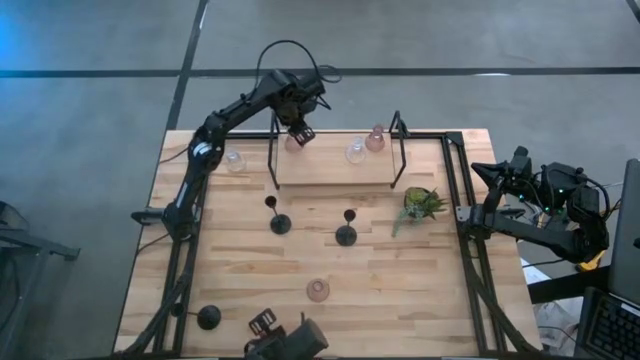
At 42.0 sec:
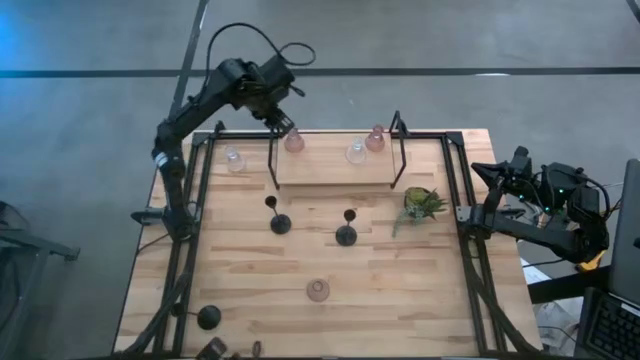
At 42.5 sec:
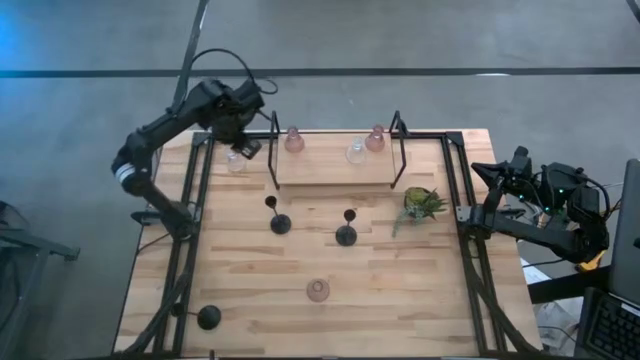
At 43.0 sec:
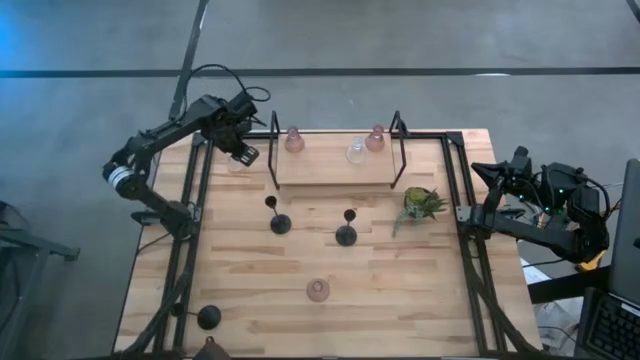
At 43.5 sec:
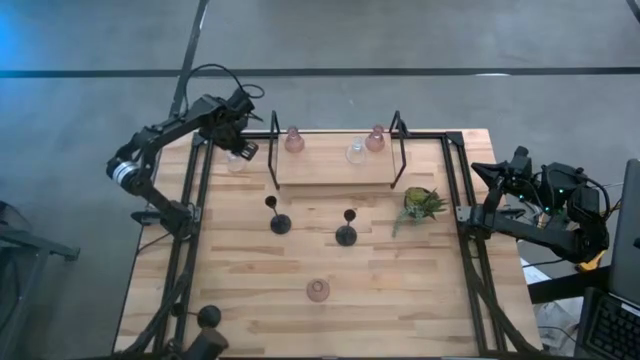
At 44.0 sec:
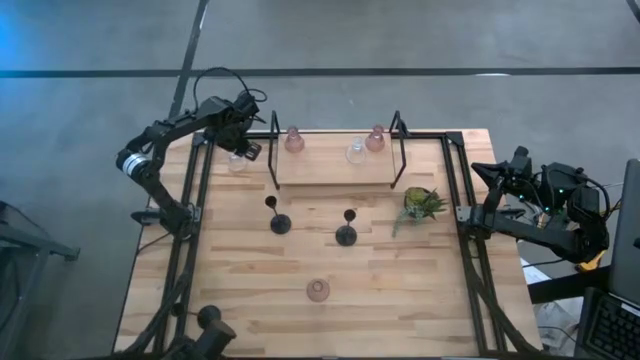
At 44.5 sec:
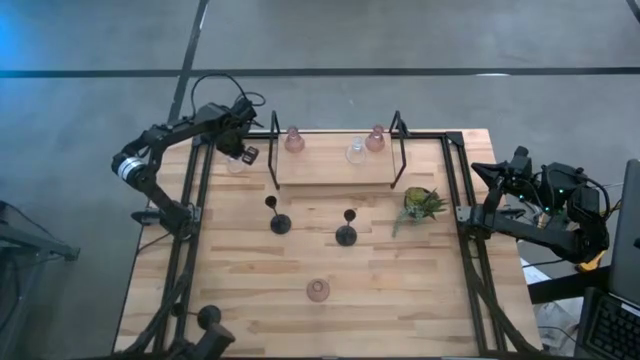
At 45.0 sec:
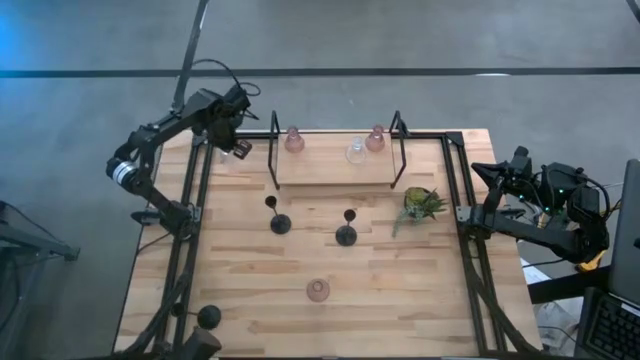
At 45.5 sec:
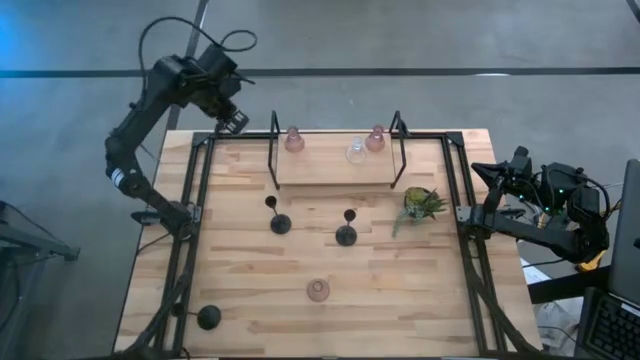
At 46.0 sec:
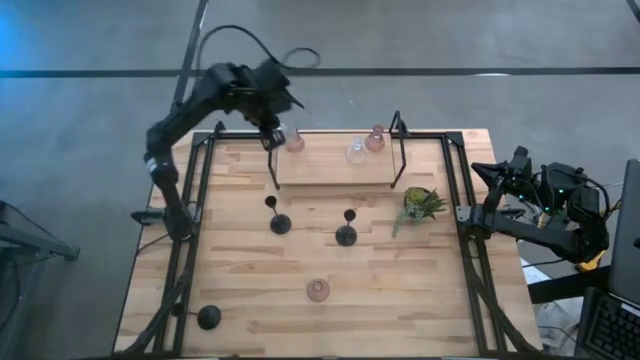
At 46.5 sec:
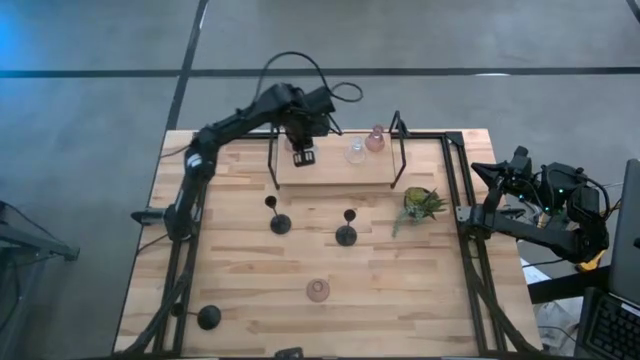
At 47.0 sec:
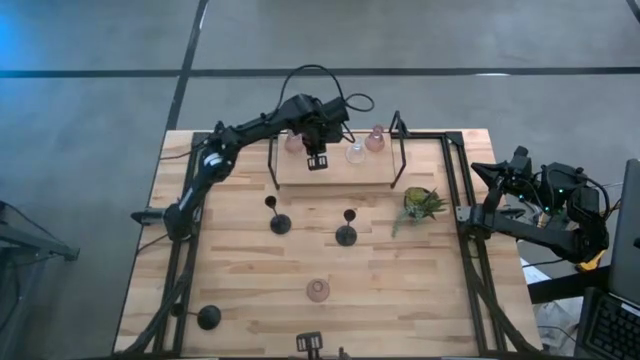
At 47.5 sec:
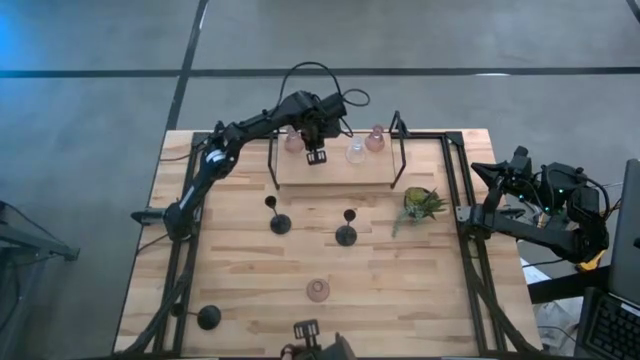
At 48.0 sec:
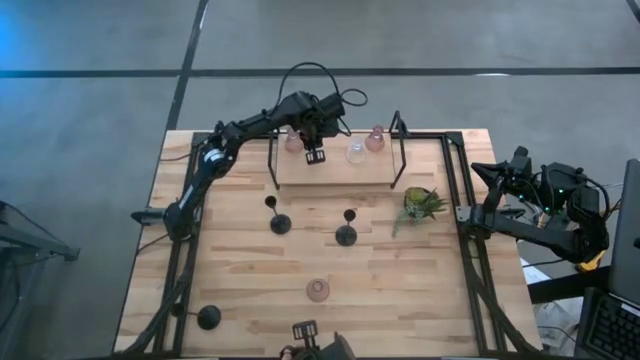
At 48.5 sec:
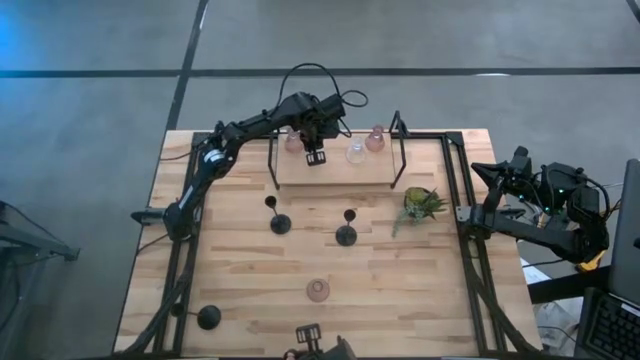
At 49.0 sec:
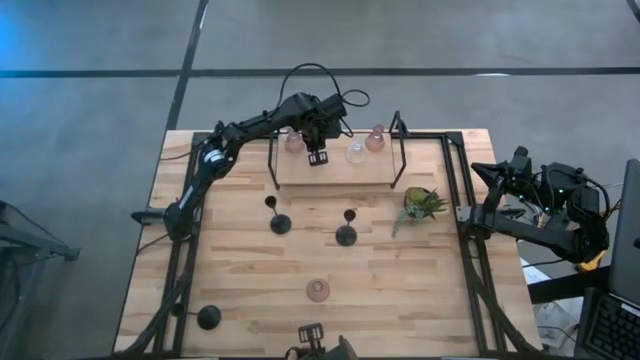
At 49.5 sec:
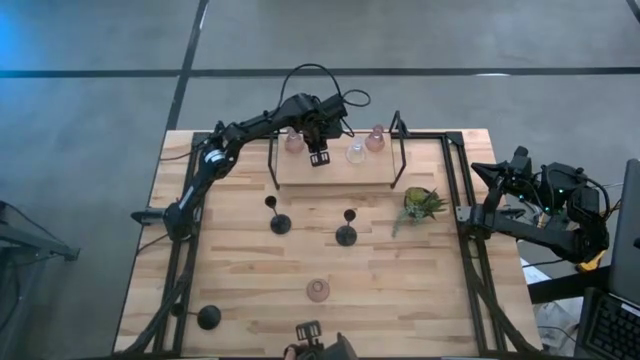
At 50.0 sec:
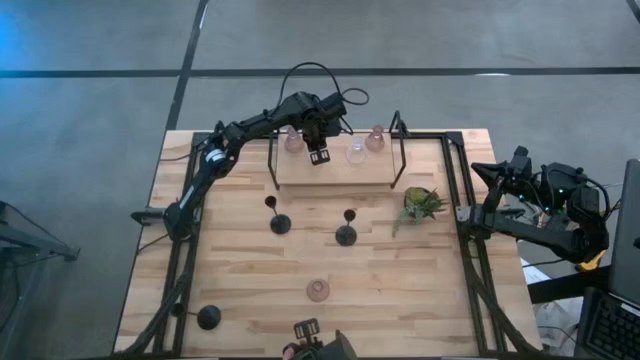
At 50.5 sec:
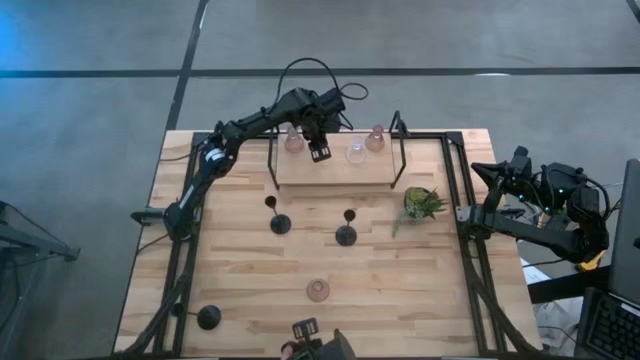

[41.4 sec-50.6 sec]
Task: Pick & Place candle stick holders
Put the transparent glass candle holder on the shelf

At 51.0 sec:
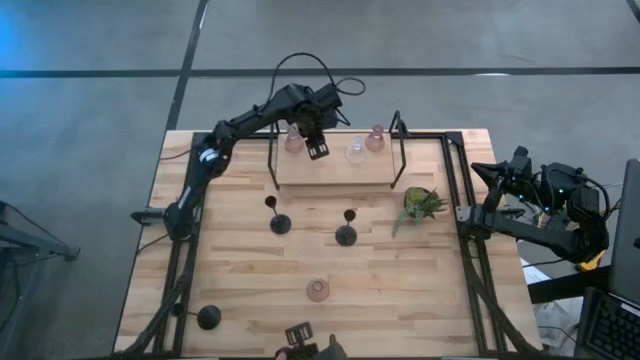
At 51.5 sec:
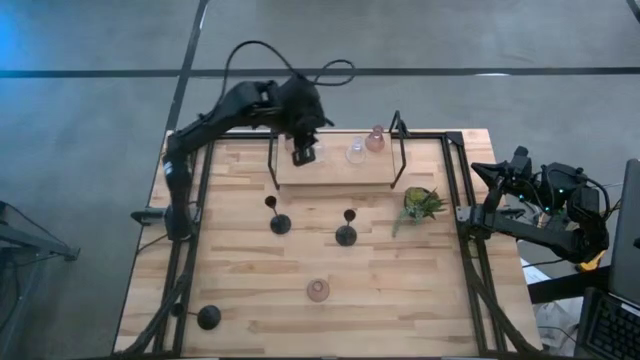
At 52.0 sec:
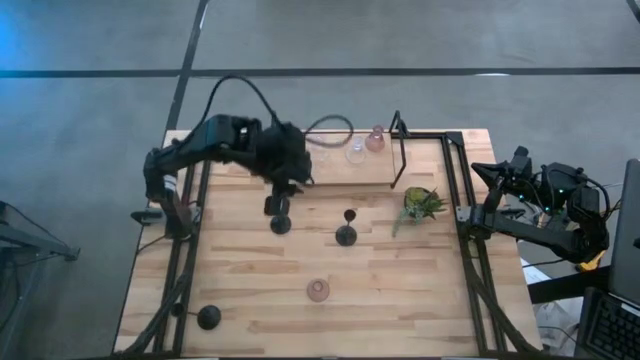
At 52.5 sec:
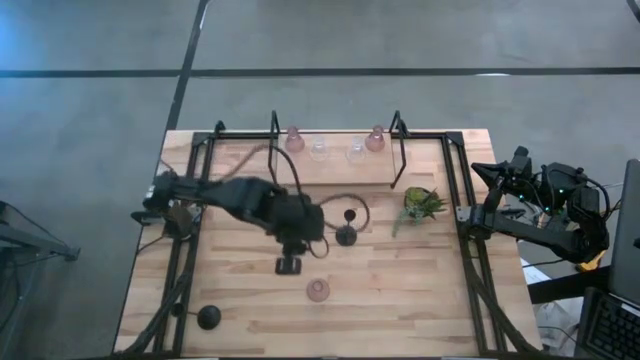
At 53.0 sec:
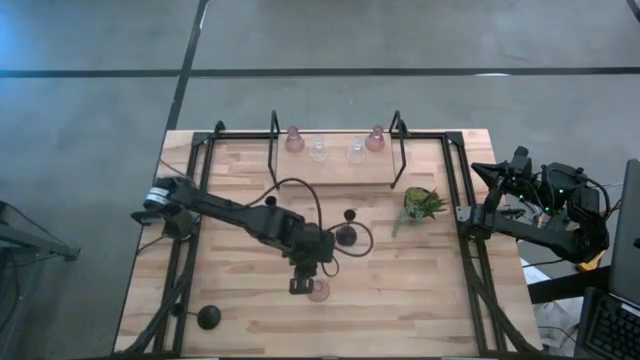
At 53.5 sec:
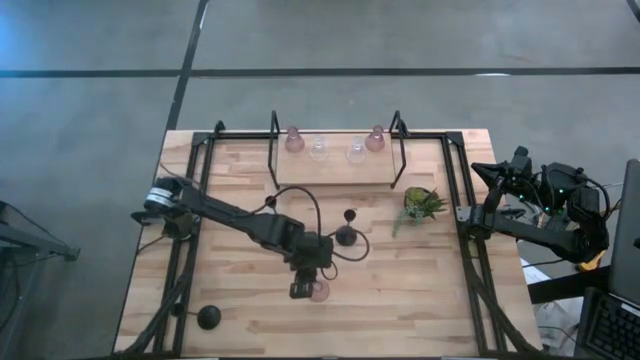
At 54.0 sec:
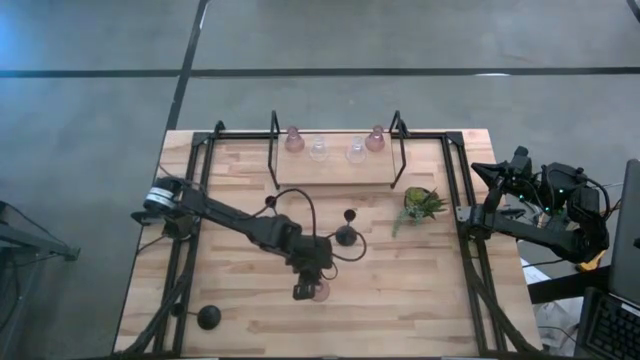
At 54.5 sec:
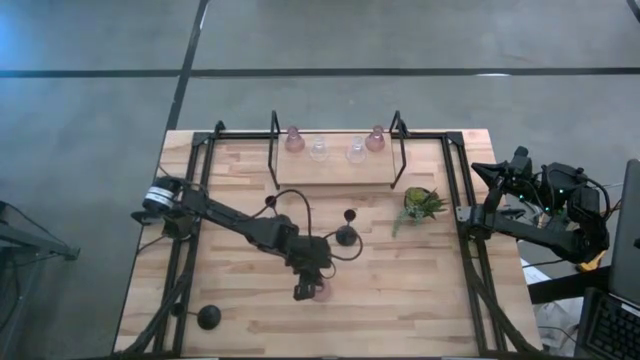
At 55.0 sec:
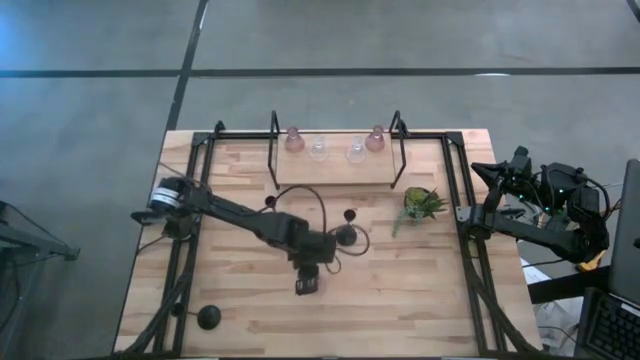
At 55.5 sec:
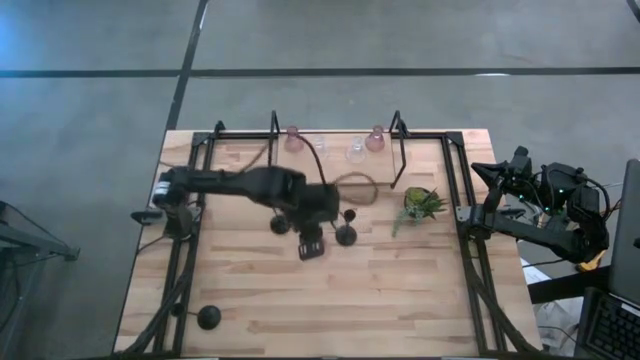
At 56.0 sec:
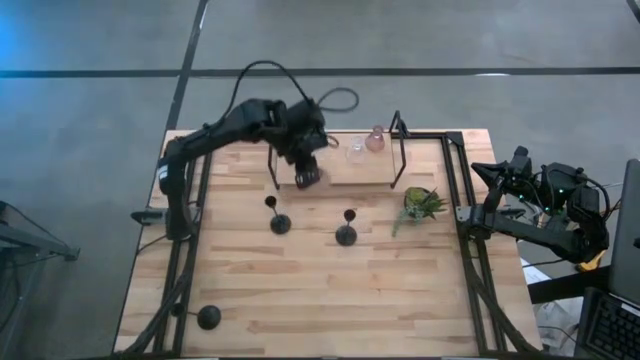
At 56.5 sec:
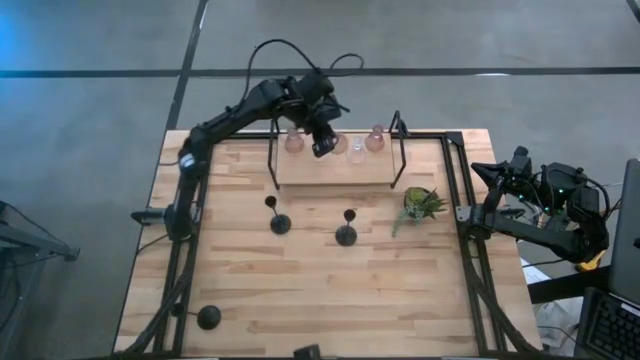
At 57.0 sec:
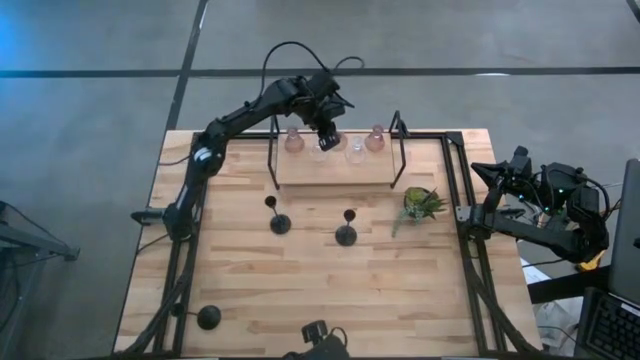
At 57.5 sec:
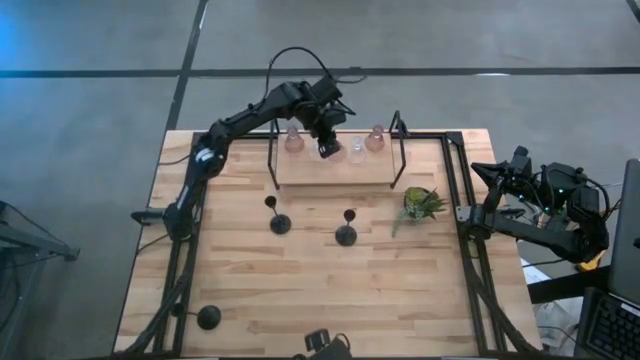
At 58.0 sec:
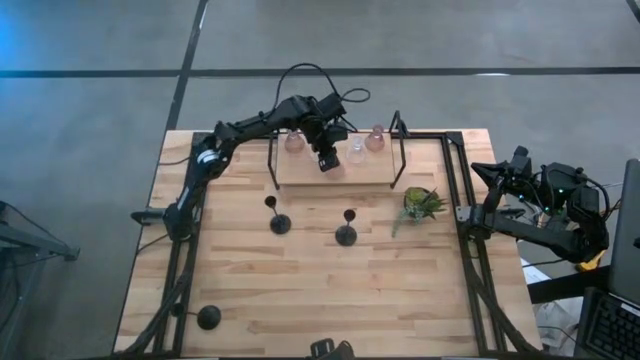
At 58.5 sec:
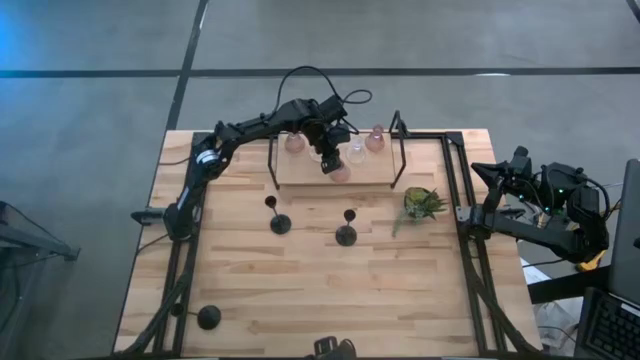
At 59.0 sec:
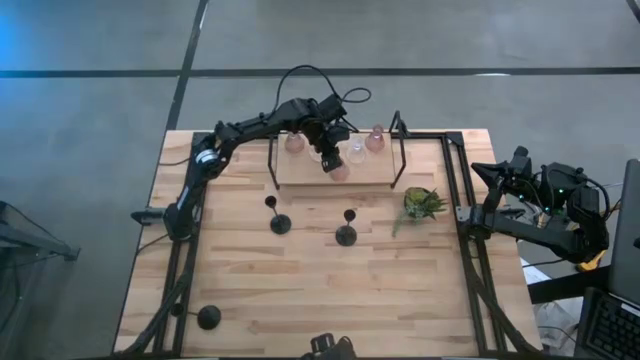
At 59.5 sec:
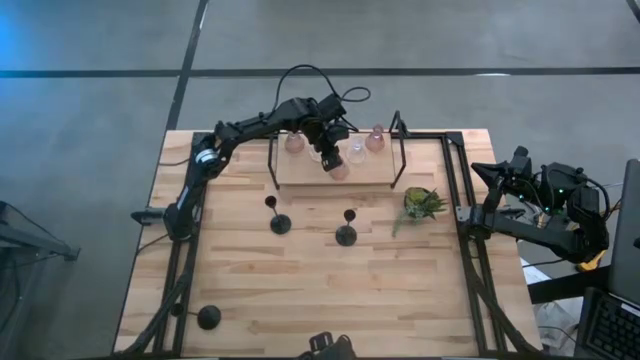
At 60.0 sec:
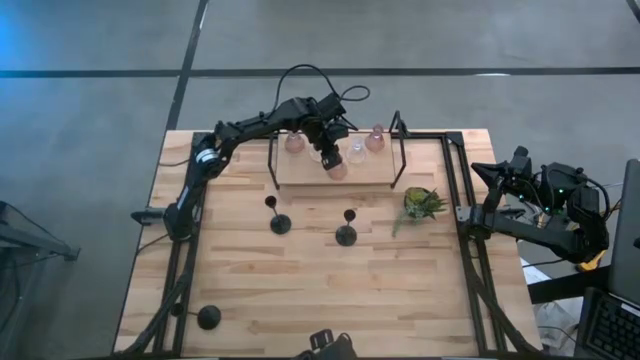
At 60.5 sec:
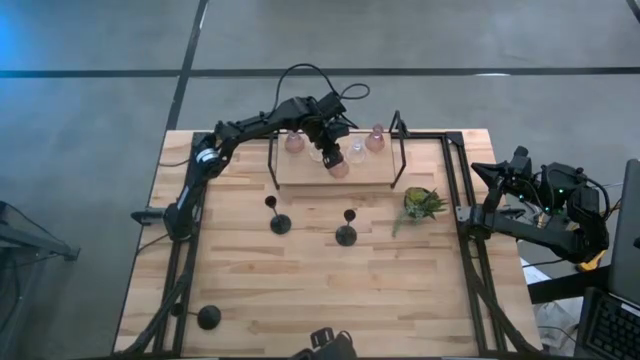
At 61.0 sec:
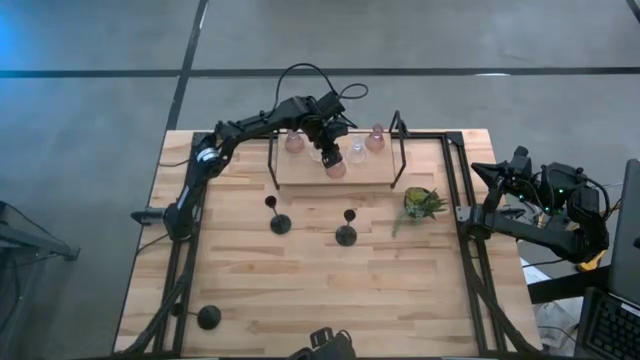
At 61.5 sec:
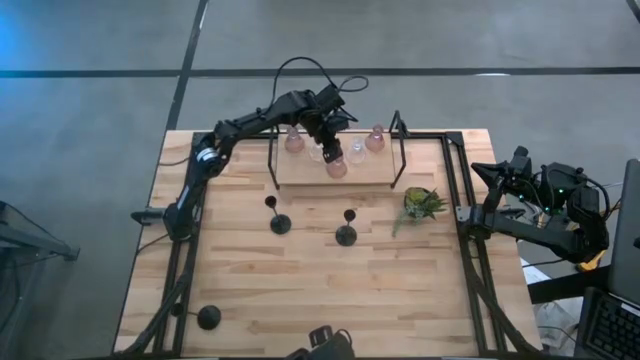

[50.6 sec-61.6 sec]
Put the pink glass candle holder on the shelf
